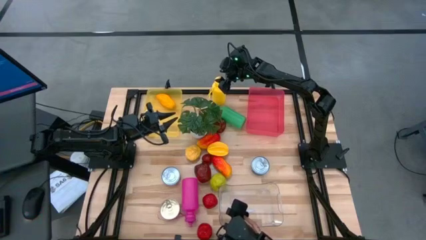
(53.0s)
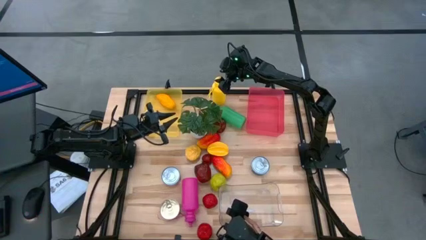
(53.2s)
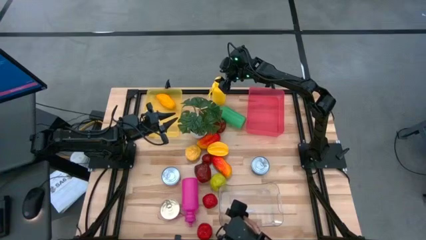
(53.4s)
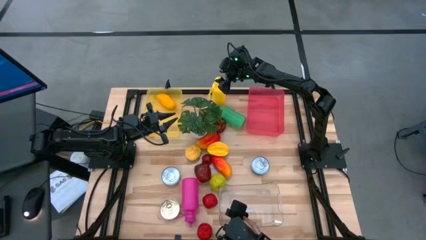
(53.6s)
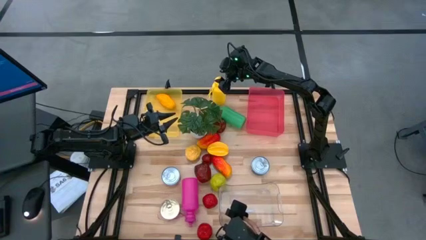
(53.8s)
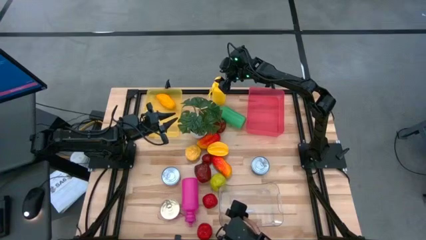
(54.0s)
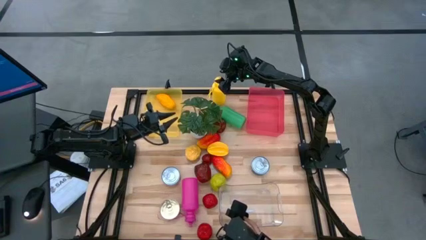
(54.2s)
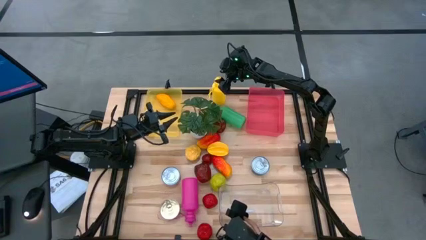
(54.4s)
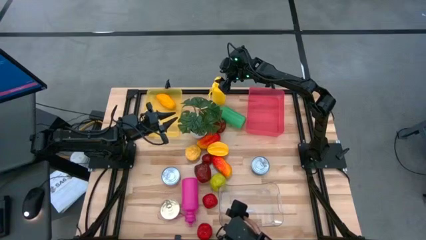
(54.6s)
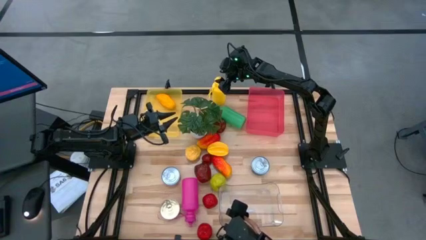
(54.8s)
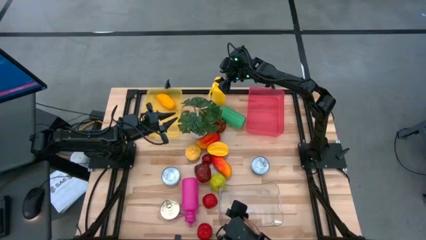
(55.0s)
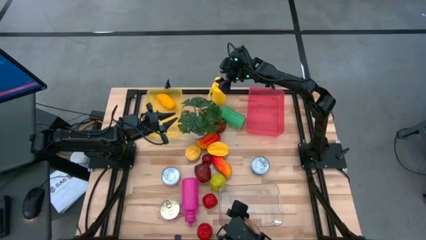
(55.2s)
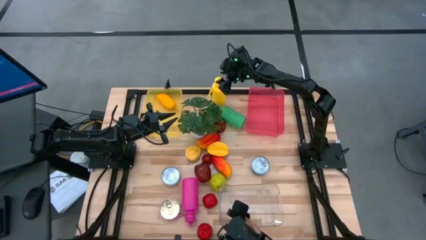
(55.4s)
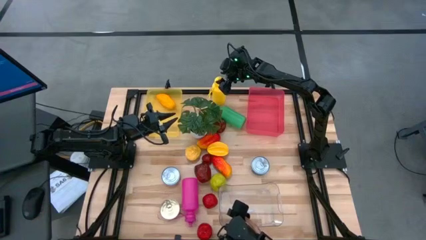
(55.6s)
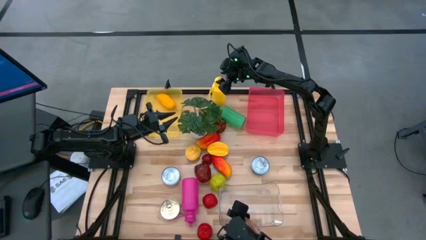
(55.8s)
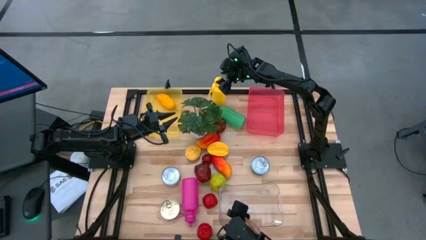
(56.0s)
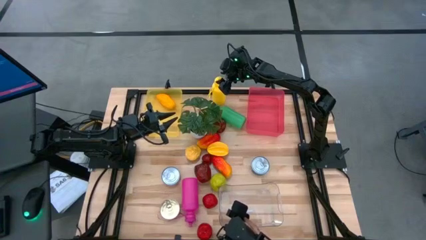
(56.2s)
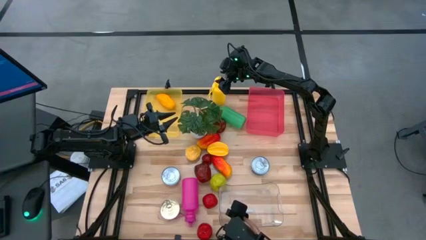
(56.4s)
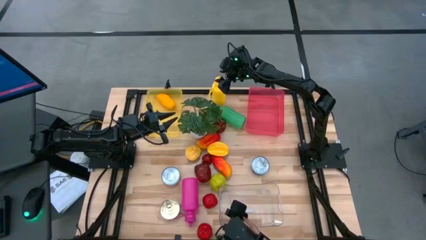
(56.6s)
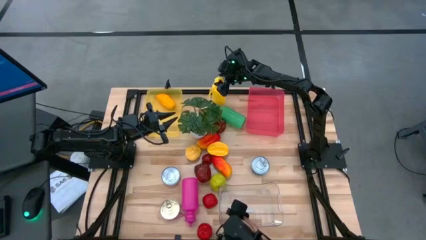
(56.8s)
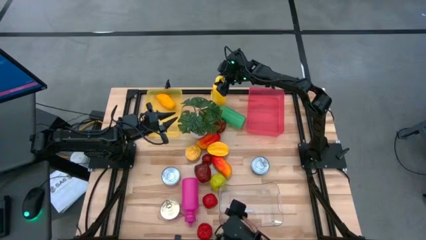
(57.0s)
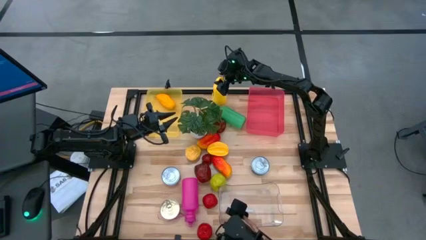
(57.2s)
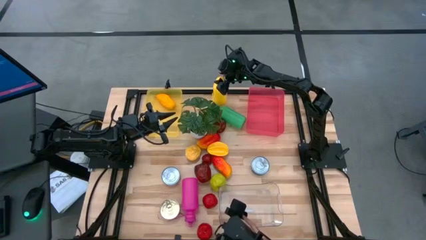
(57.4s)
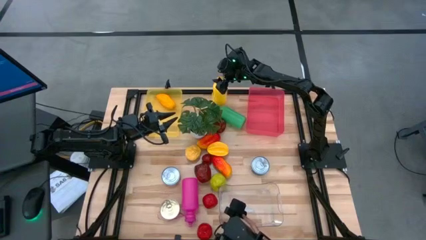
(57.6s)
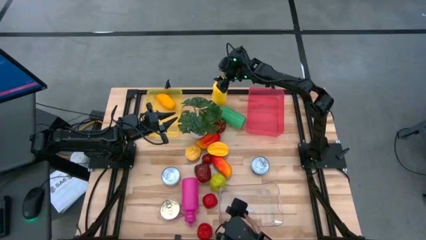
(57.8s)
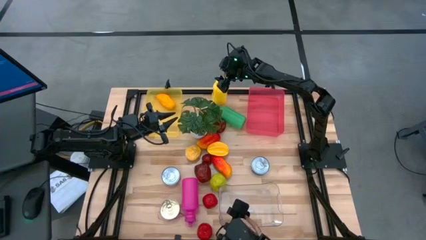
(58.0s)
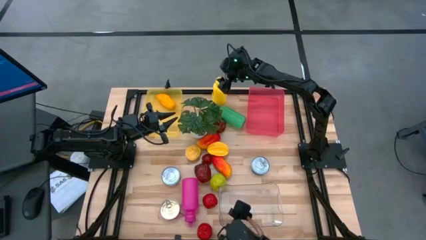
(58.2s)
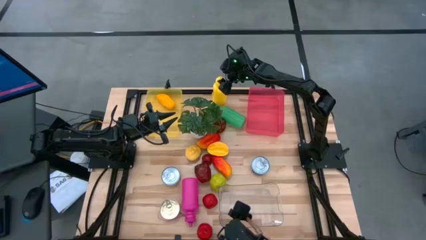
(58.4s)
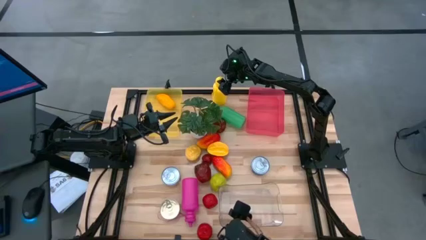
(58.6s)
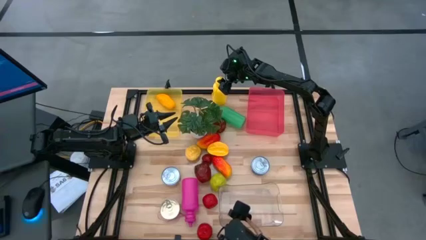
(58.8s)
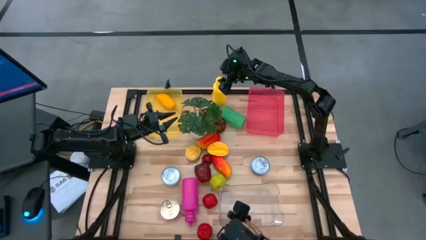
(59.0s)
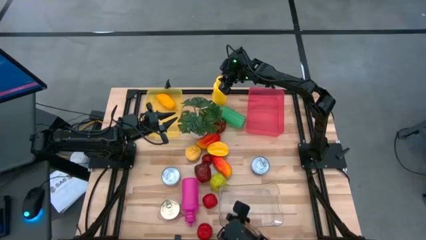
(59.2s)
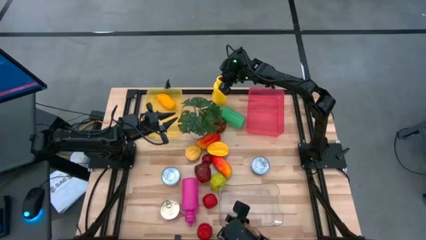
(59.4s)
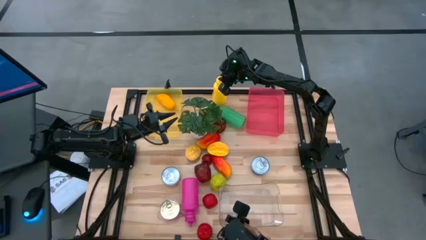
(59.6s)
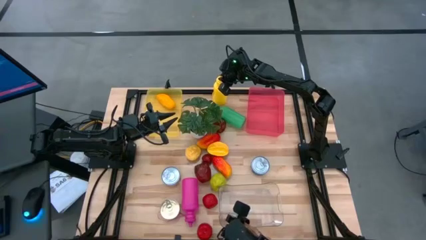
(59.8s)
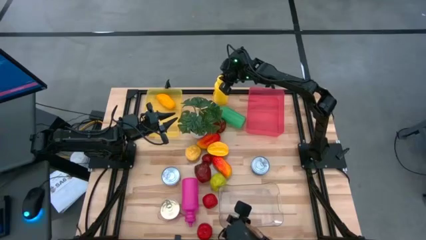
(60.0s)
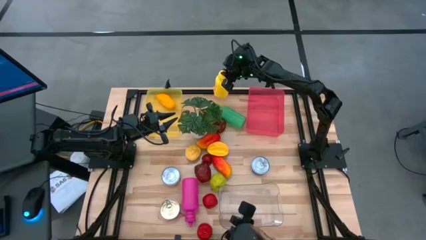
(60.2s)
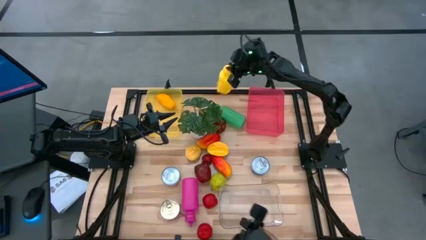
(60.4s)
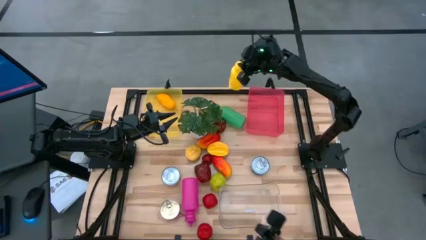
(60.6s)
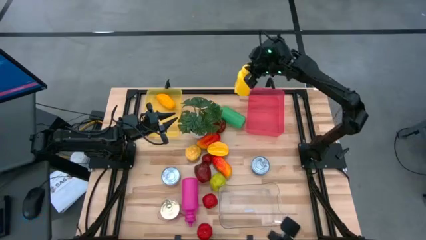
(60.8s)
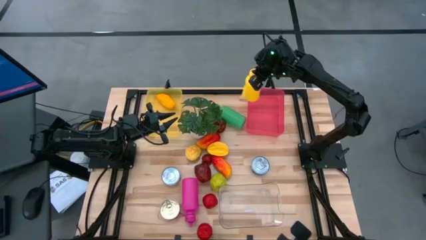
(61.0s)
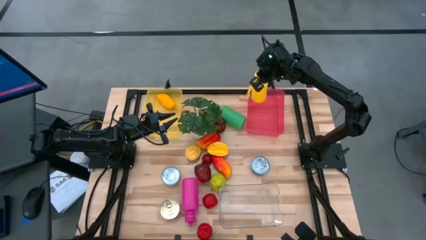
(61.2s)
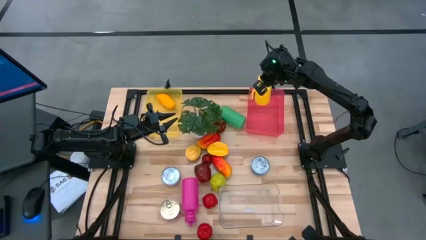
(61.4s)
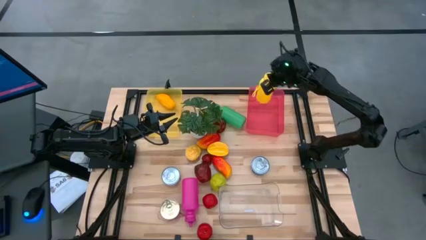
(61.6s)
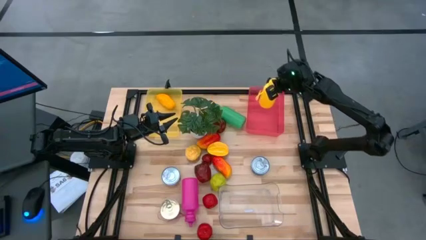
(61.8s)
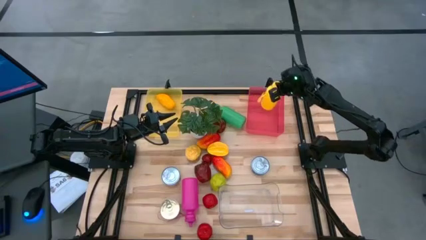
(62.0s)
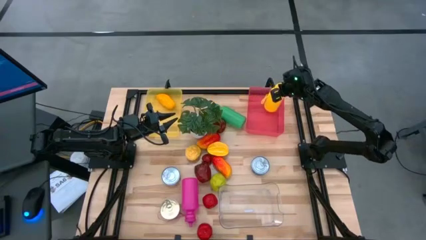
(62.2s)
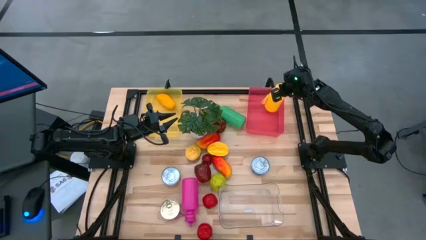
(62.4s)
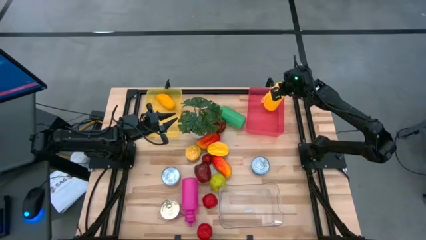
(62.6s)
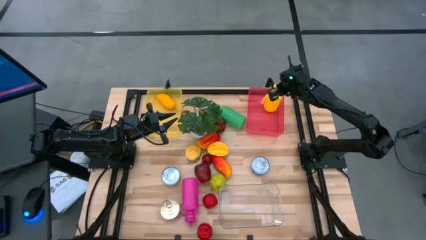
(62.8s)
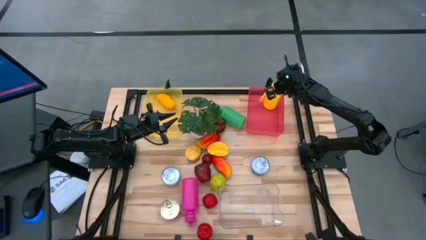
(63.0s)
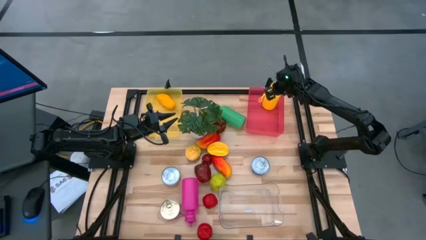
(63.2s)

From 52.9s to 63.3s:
Task: Pick & Place Food Item
Put the yellow water bottle into the pink bin
